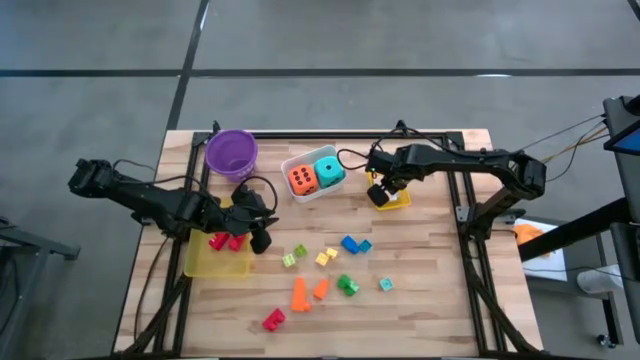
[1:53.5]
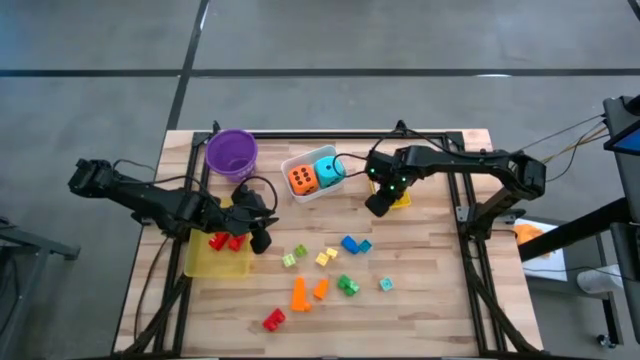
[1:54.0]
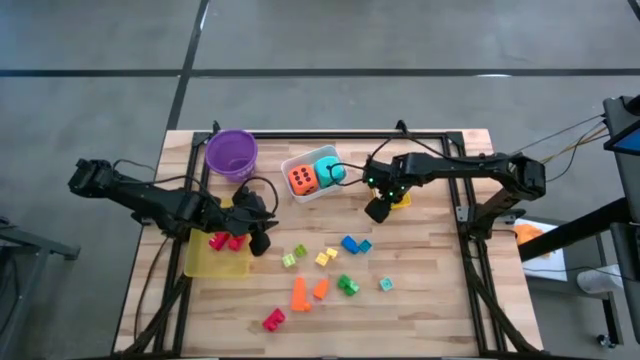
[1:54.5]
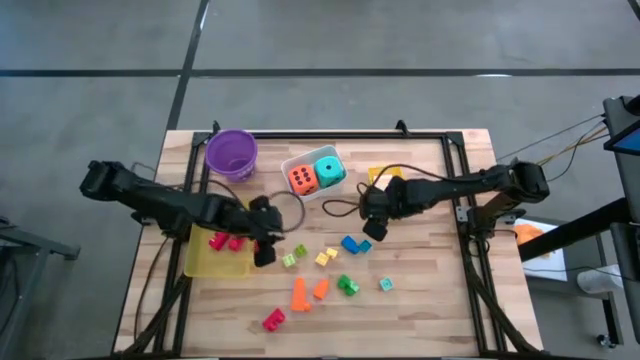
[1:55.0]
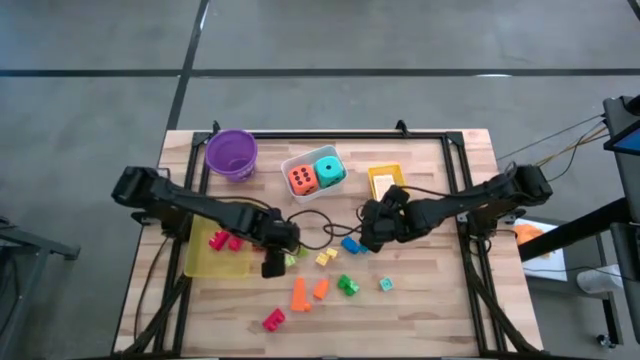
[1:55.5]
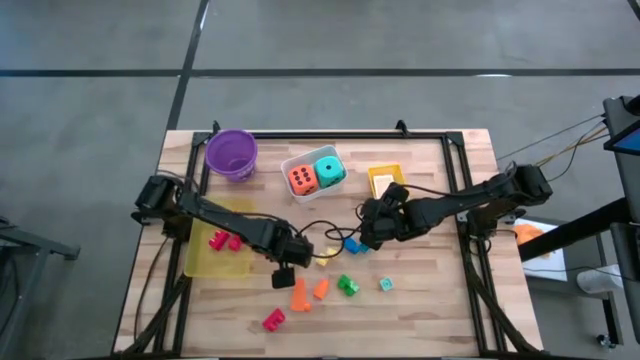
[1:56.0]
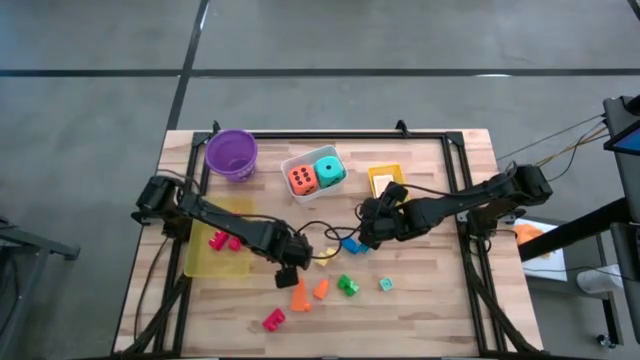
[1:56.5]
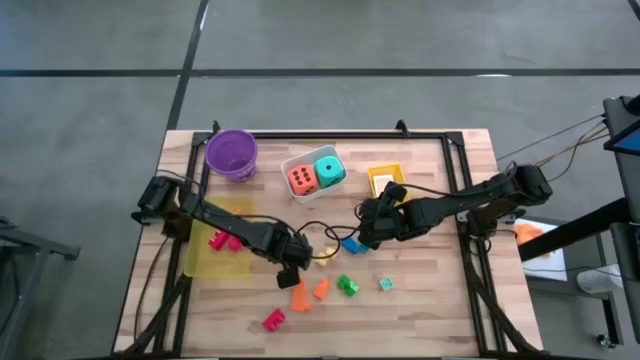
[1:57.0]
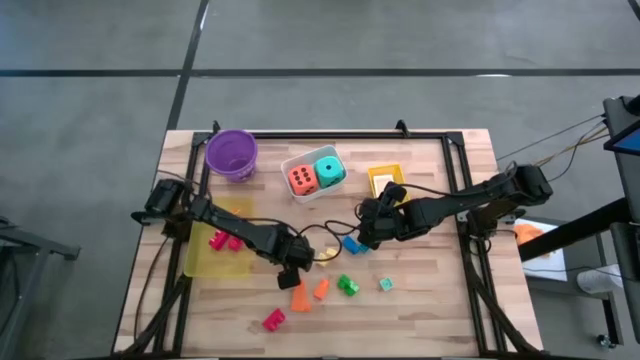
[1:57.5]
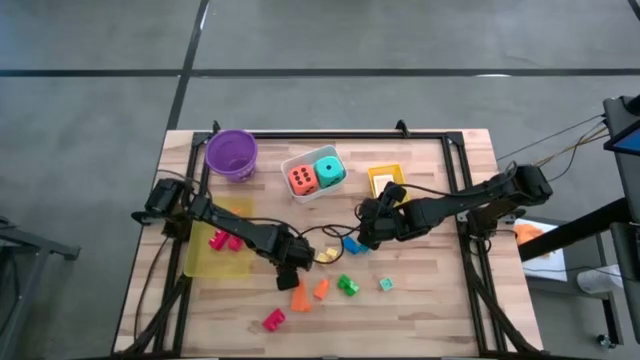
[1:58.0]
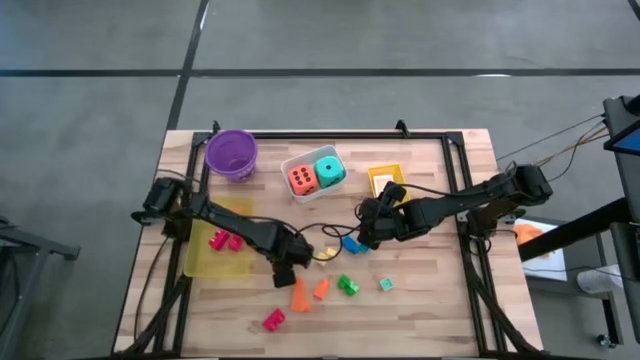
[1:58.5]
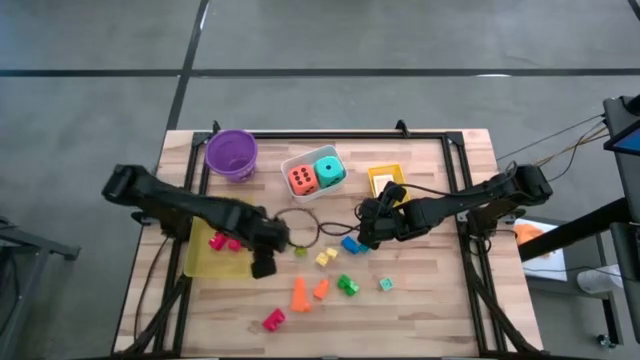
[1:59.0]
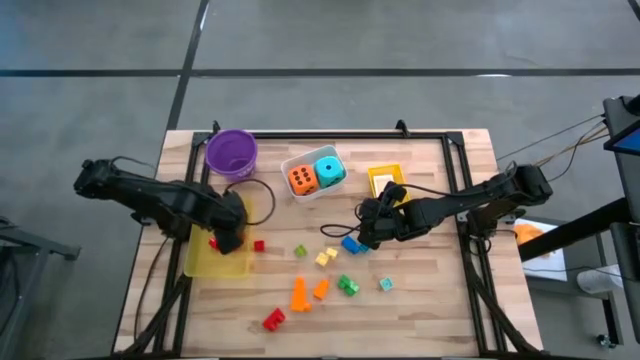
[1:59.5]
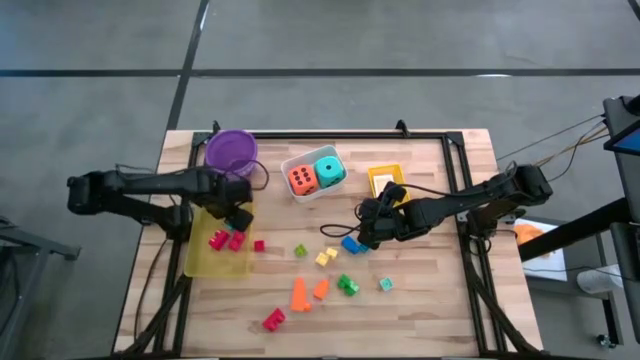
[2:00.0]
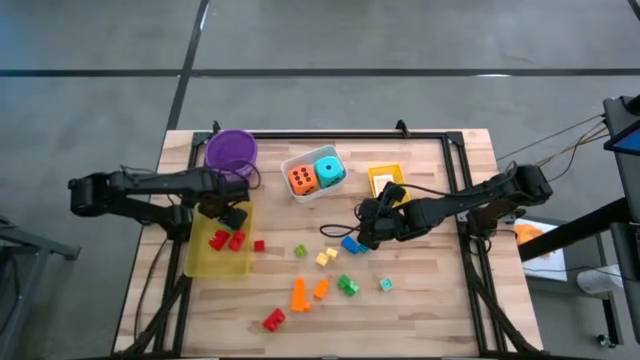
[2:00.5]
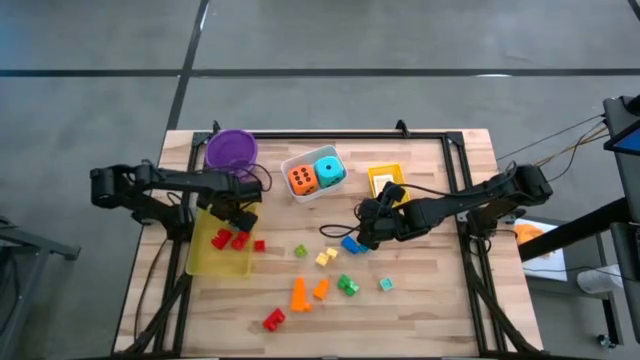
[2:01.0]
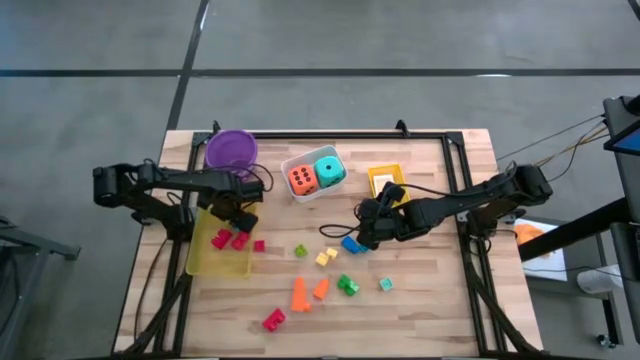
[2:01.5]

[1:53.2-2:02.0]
Task: Pick & Place Toys
Put the light green game piece into the light yellow bin

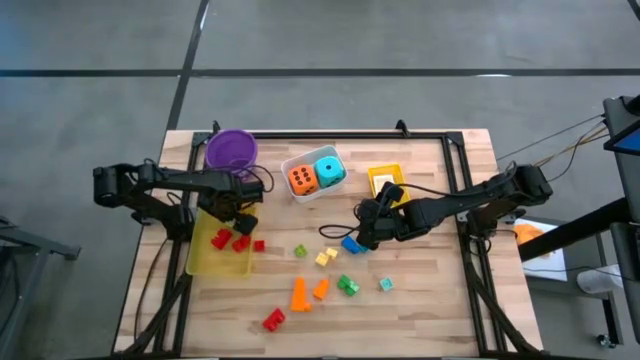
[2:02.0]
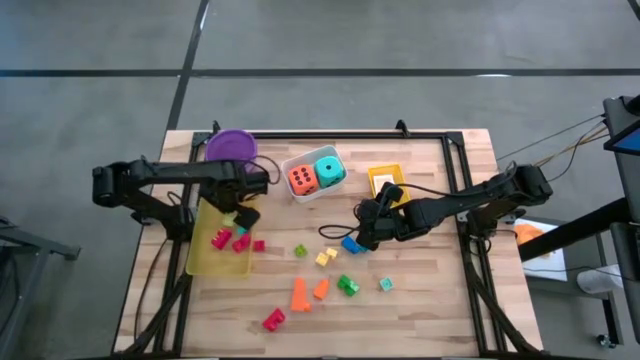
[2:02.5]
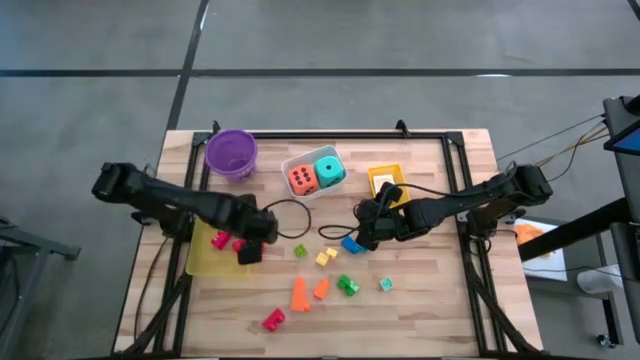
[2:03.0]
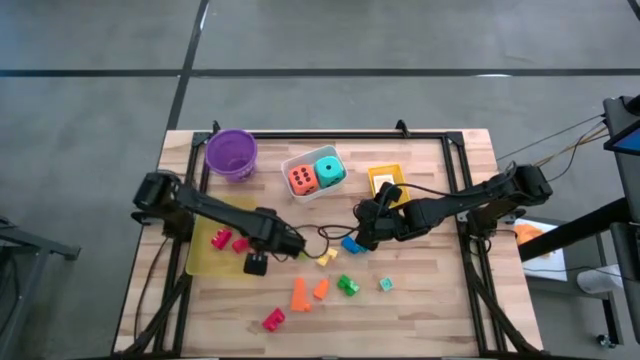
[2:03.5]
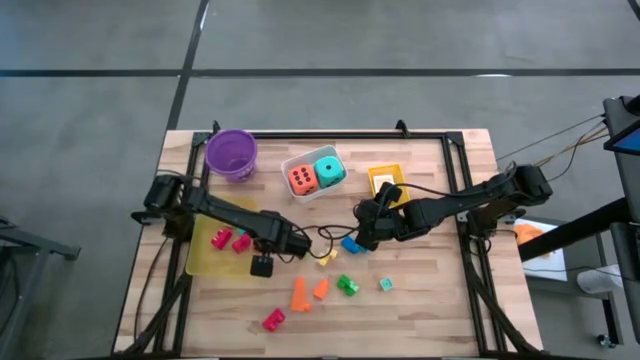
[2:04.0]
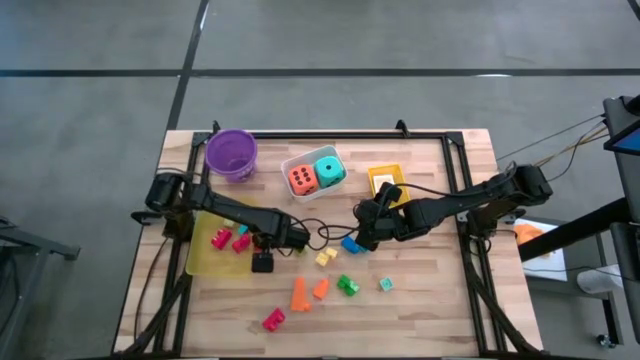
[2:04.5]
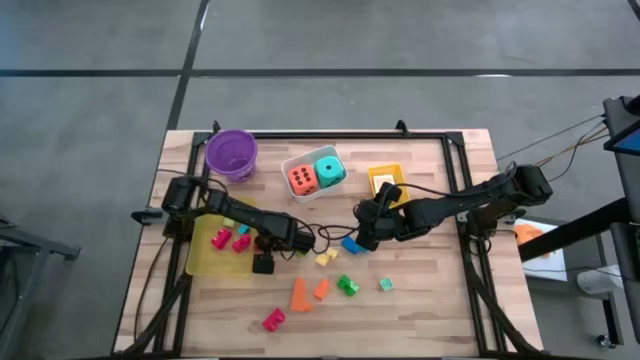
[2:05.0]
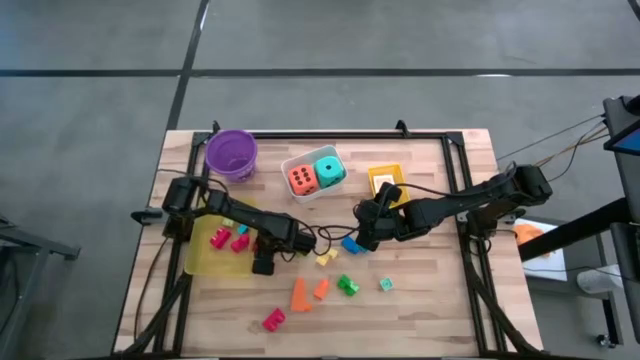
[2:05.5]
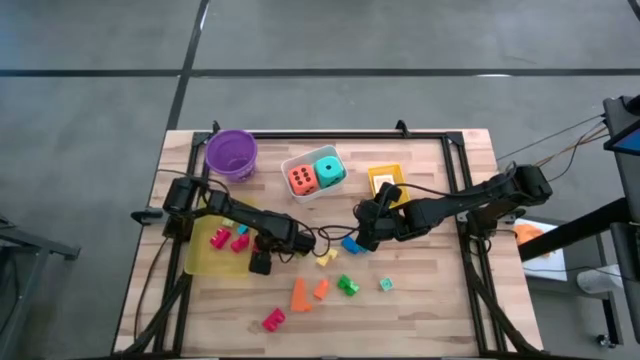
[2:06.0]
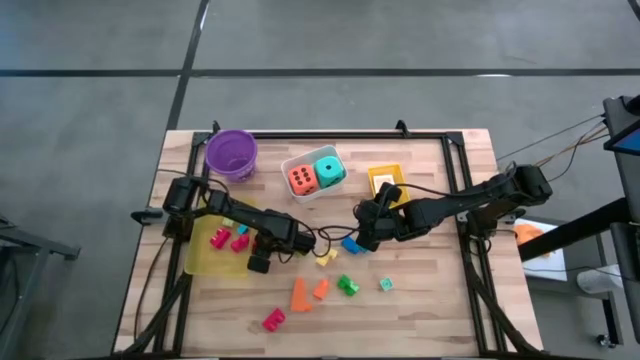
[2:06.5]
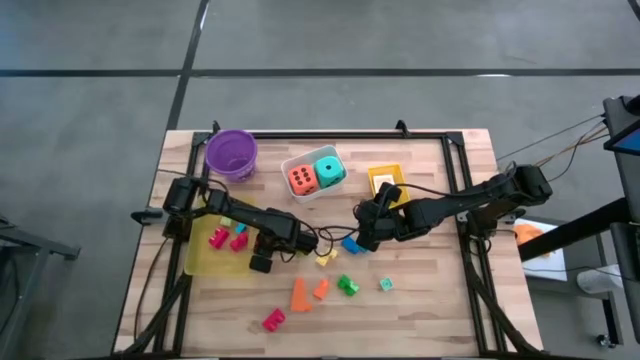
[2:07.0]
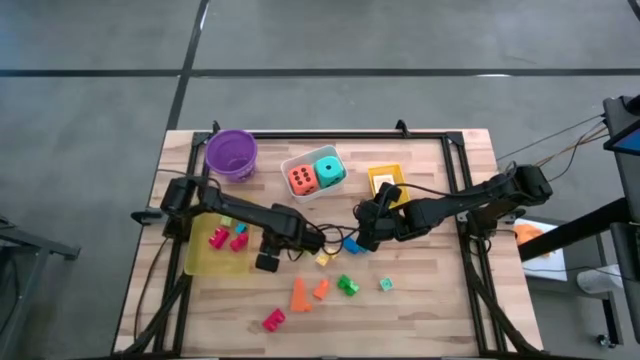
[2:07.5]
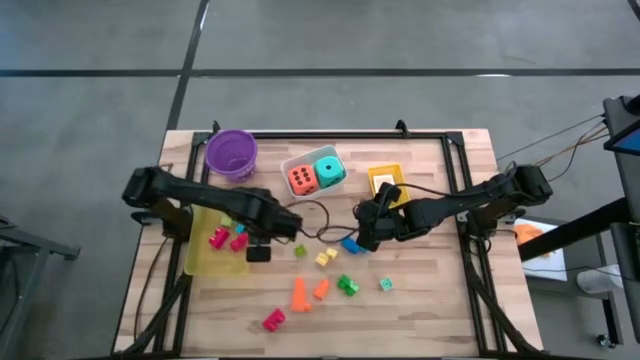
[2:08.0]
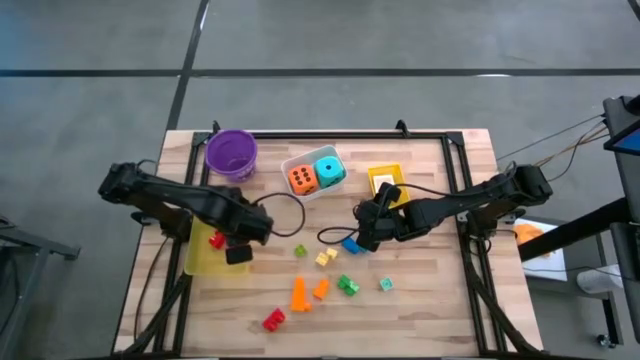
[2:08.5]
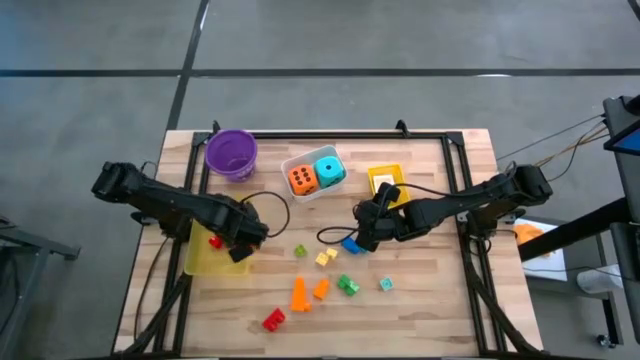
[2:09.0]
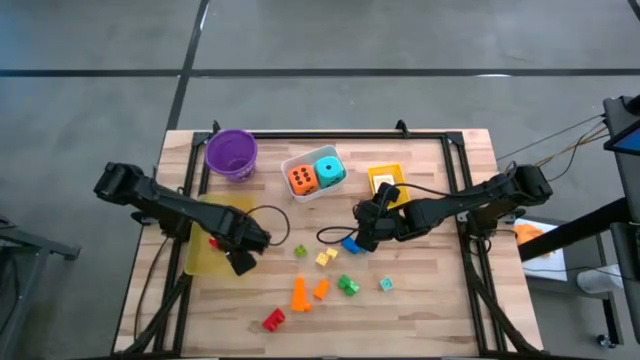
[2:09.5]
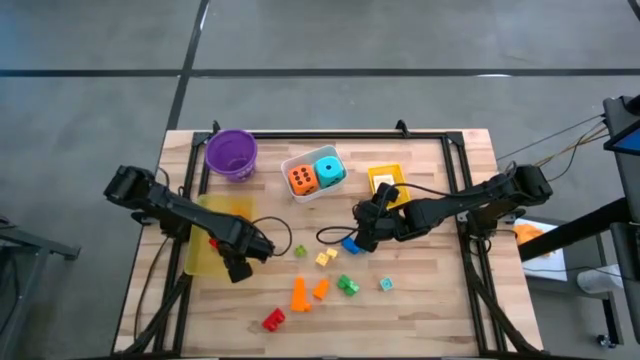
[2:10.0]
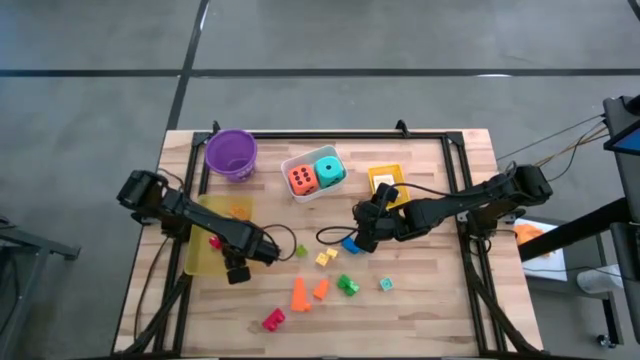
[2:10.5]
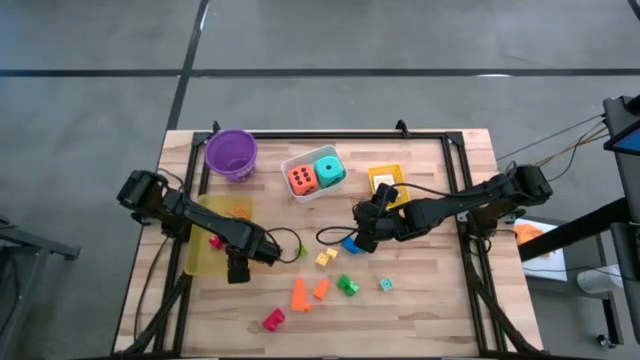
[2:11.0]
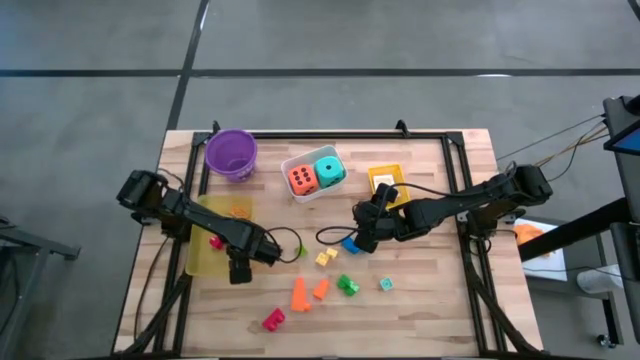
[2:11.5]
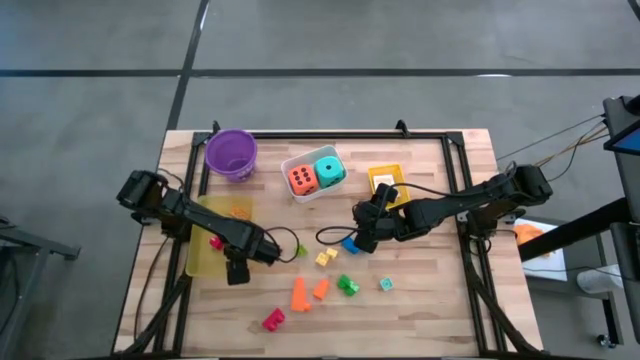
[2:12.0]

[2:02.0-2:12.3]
Put the red game piece into the light yellow bin

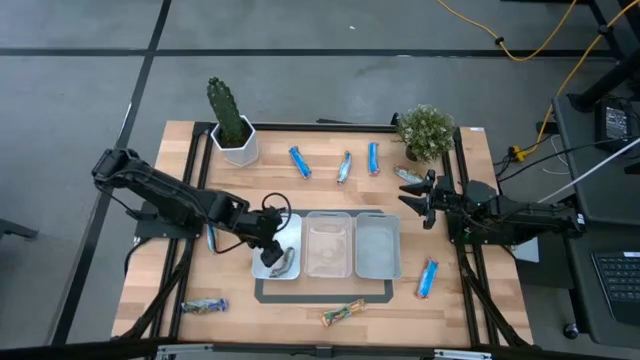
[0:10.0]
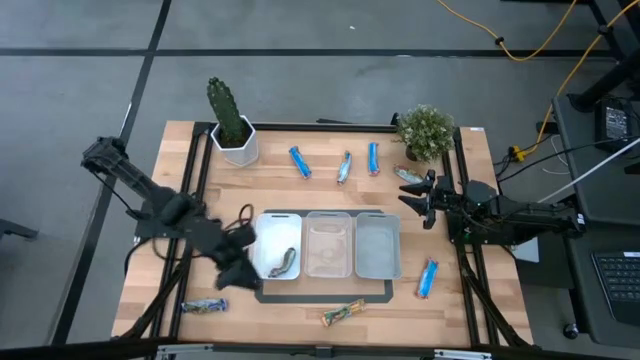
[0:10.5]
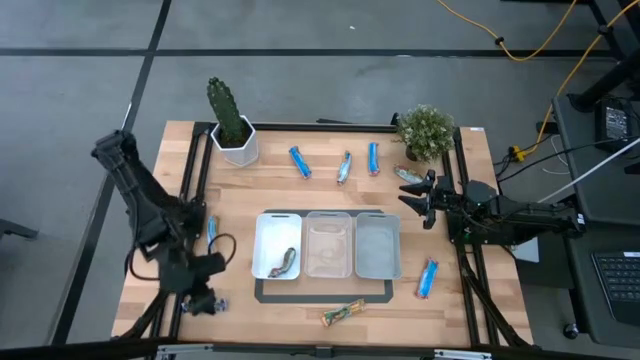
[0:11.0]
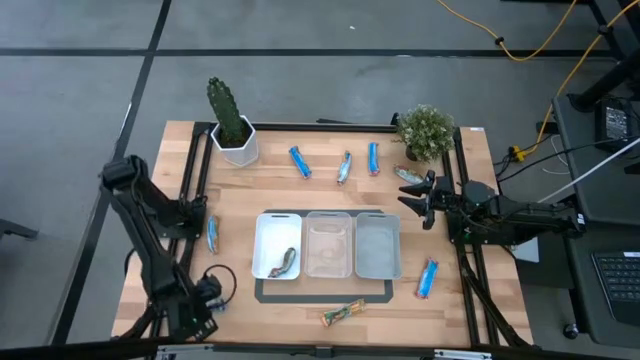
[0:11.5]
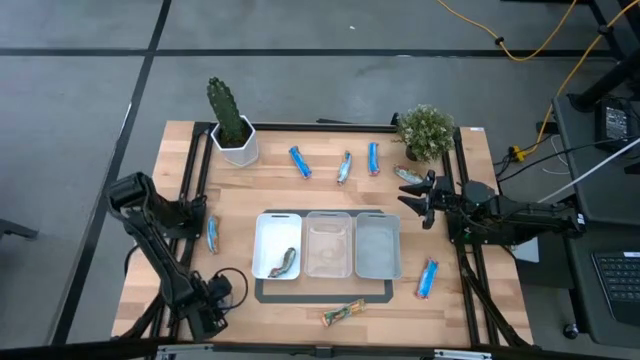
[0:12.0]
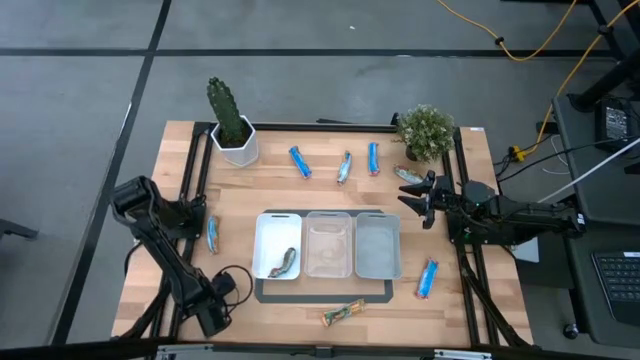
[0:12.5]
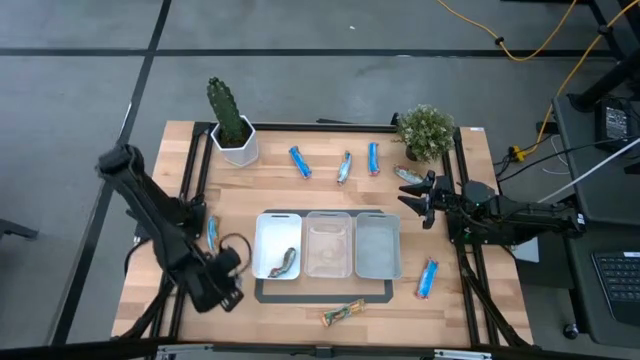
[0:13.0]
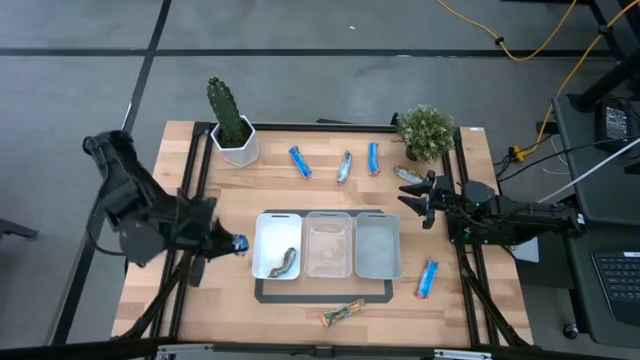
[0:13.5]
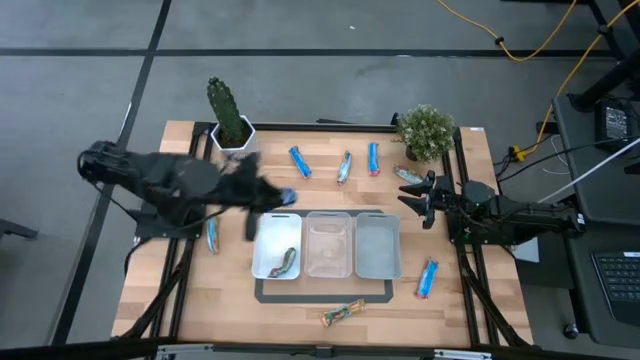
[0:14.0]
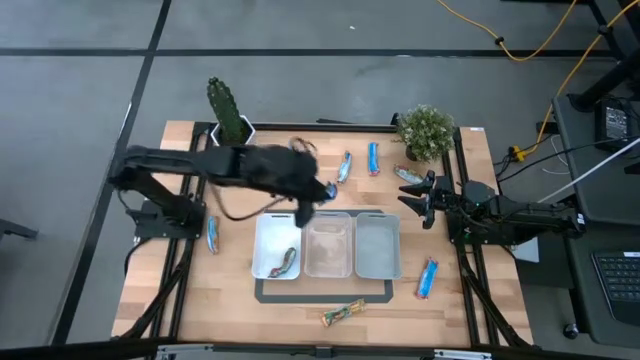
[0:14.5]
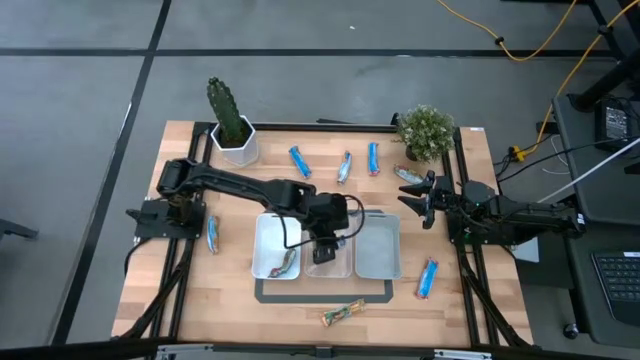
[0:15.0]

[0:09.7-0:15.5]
Task: Pick and place Granola Bars by type
Put the blue granola bar into the transparent bin
